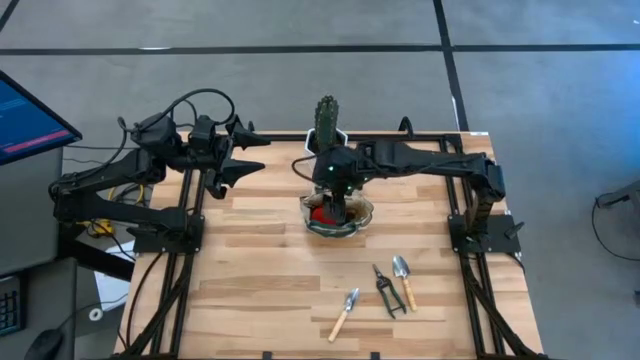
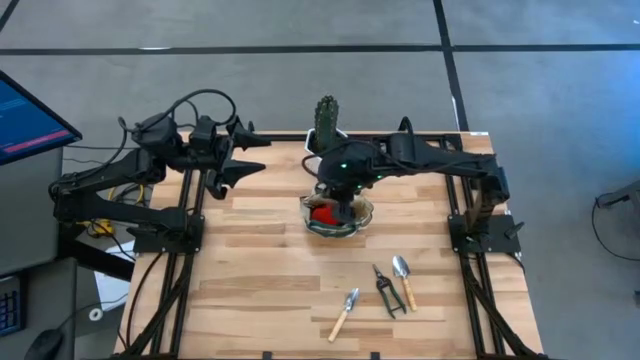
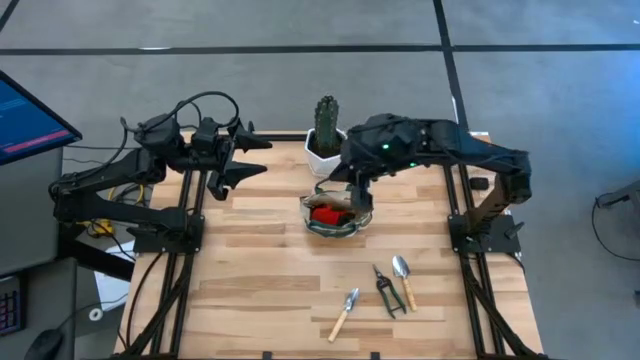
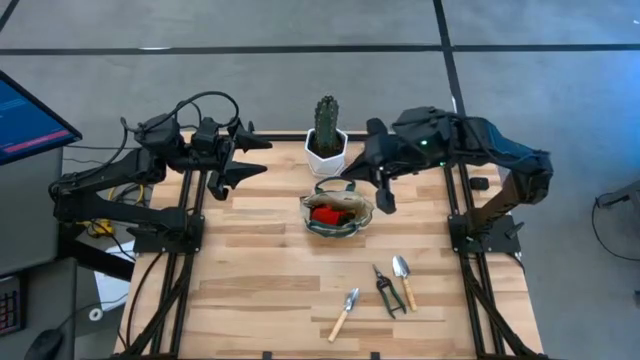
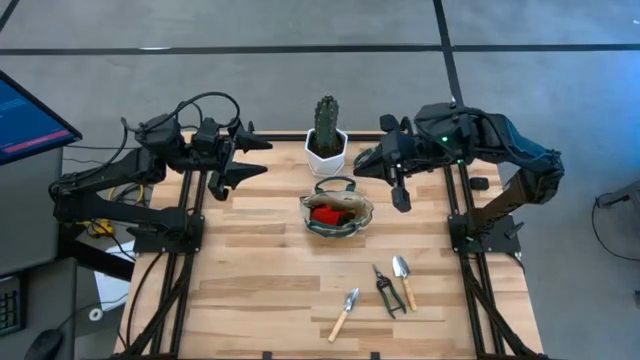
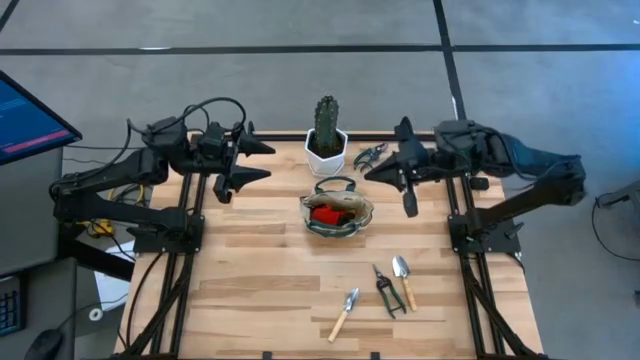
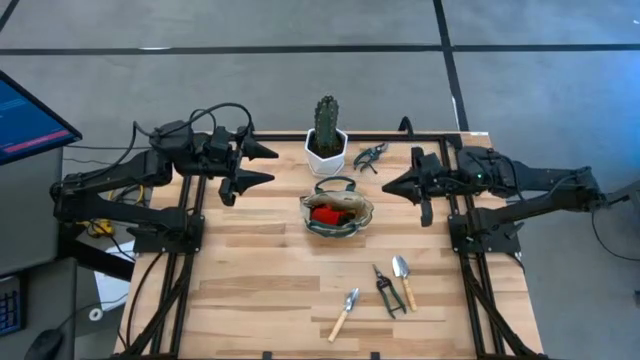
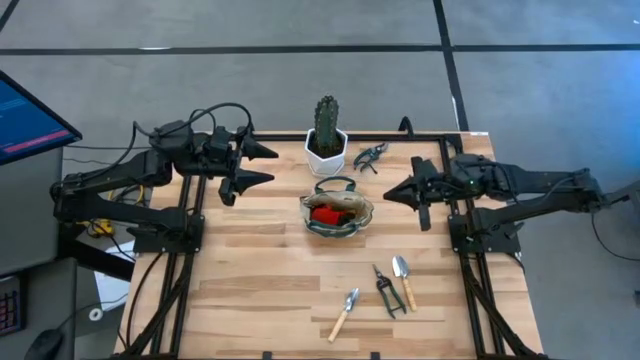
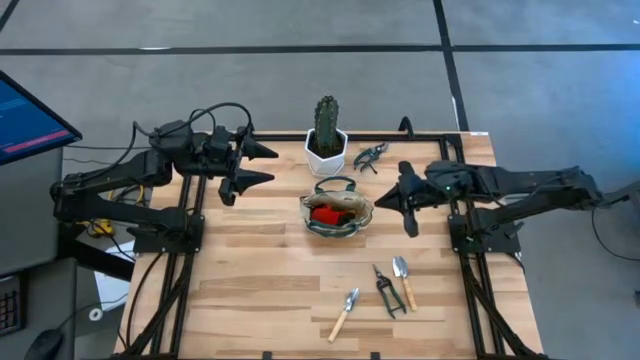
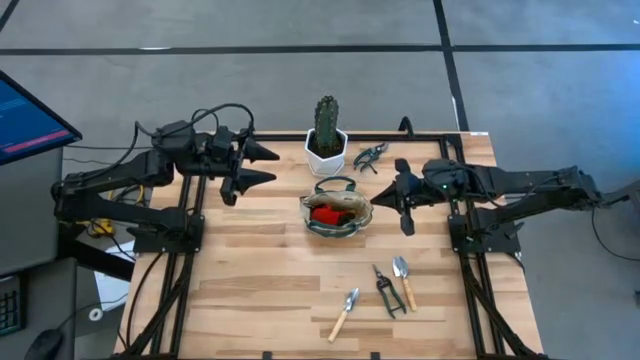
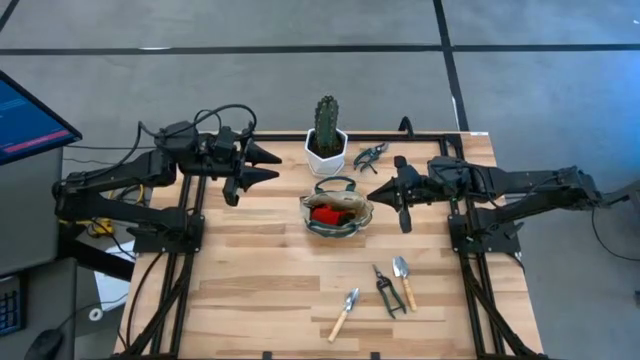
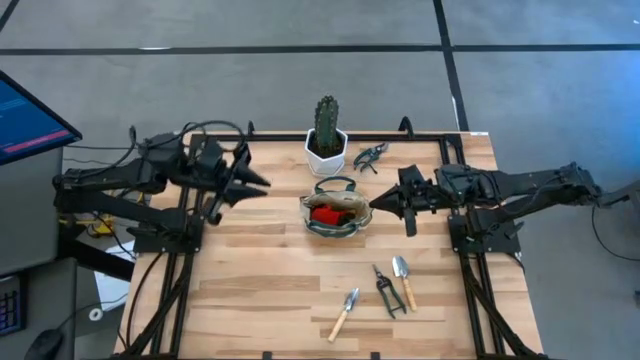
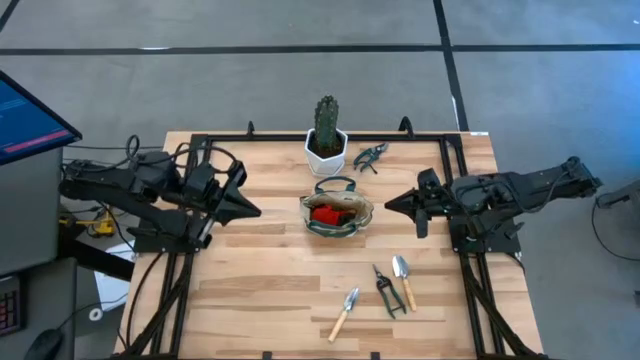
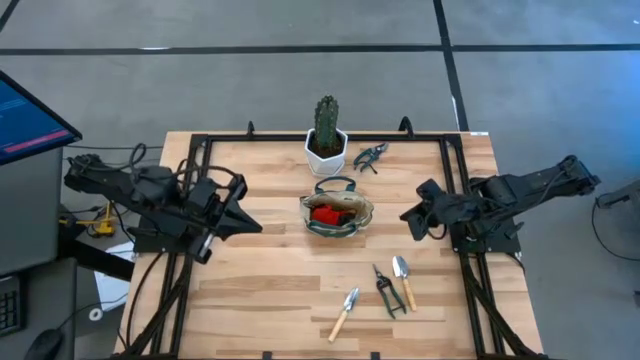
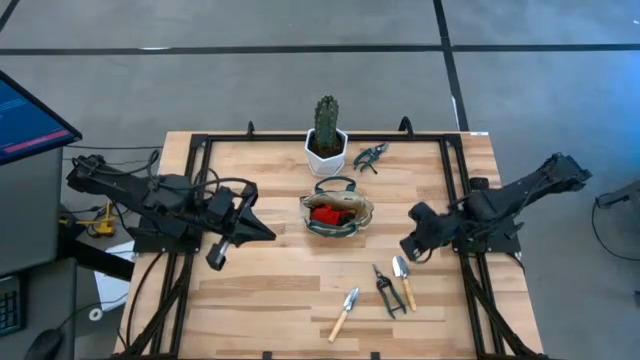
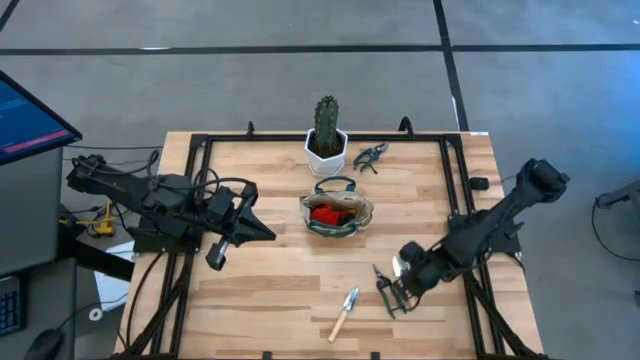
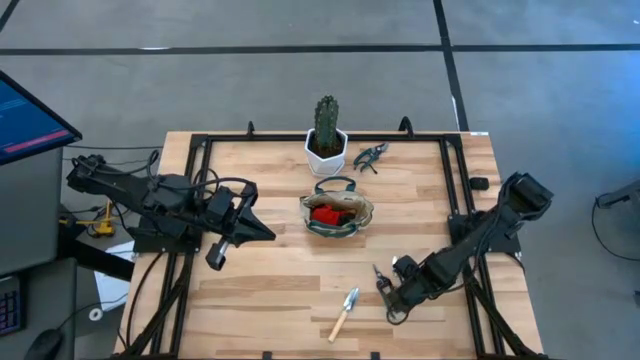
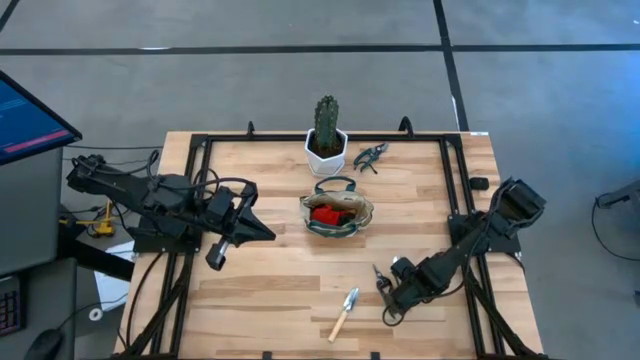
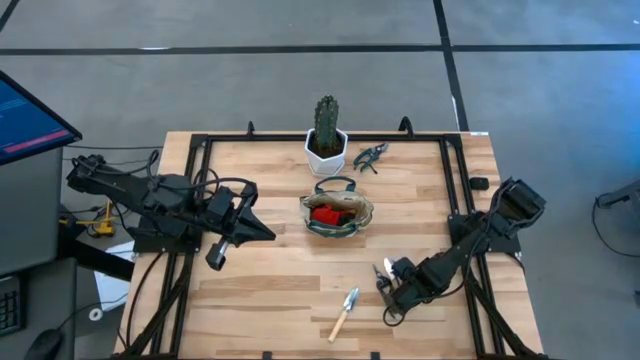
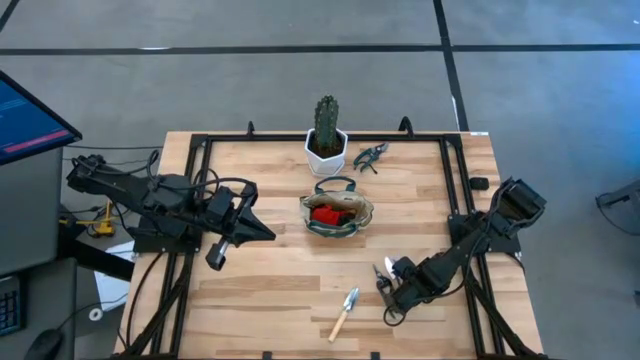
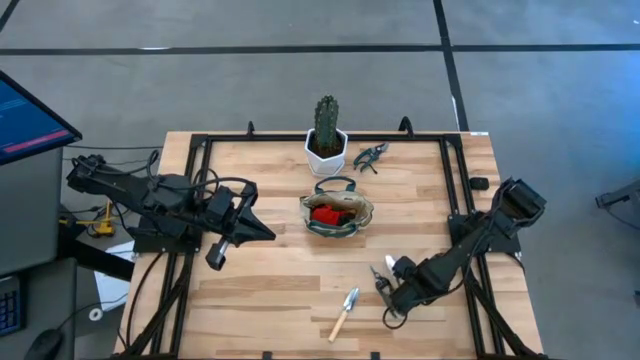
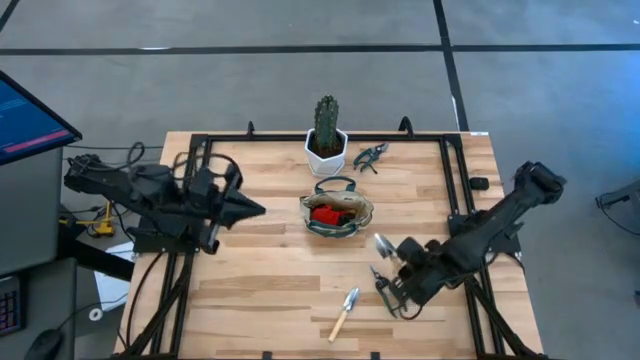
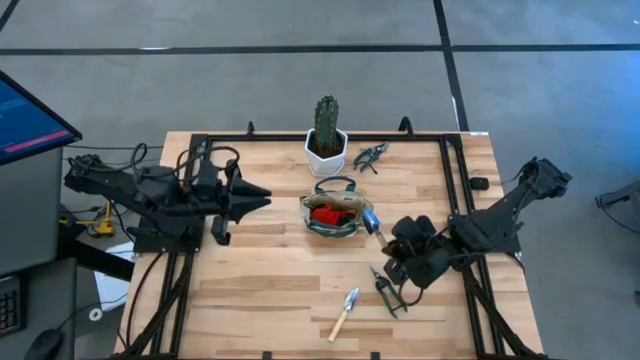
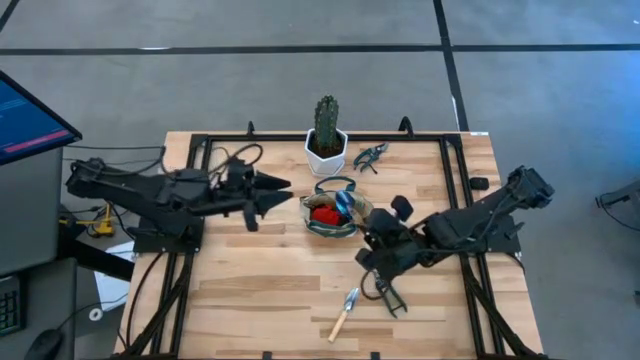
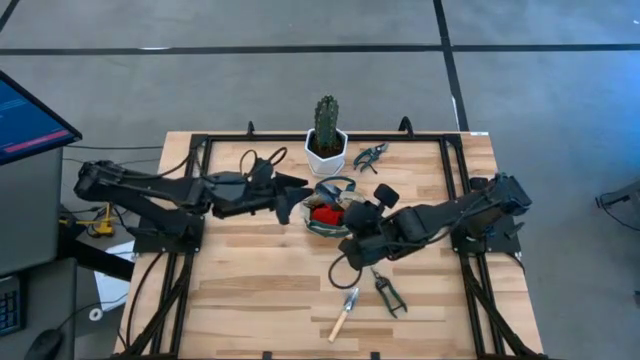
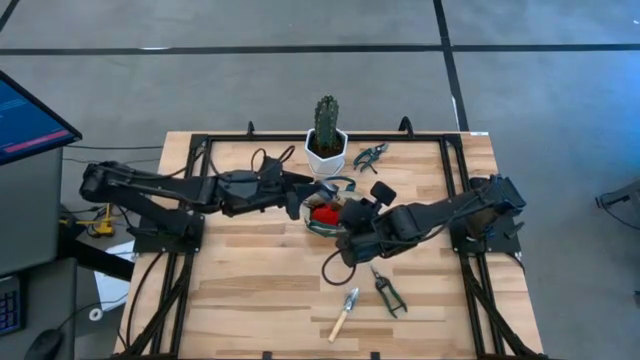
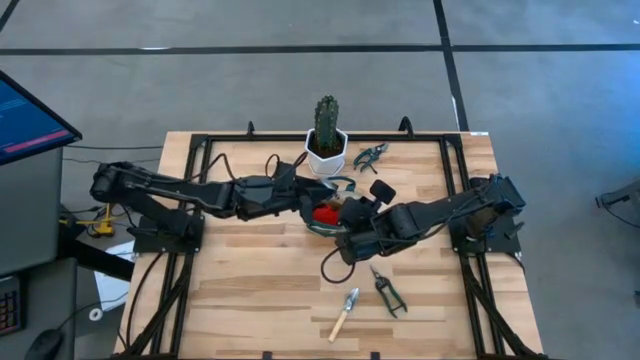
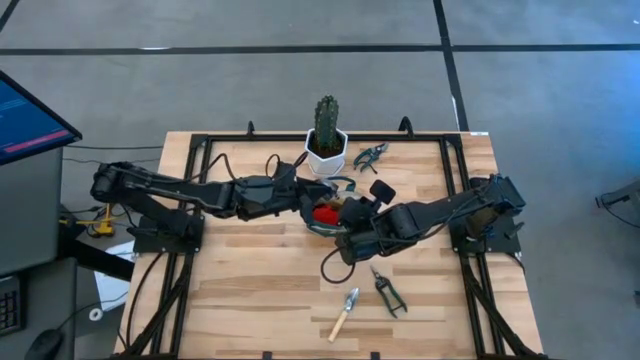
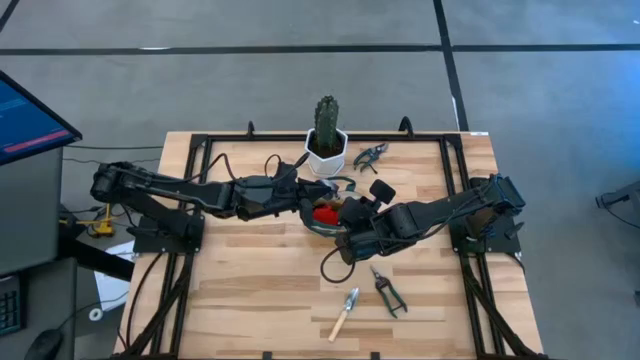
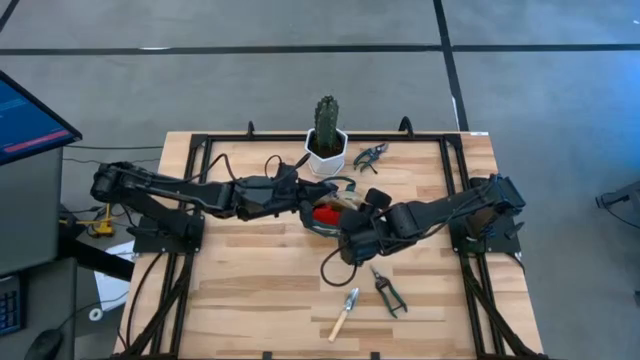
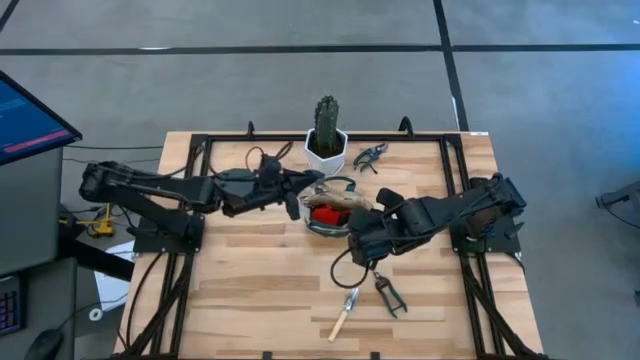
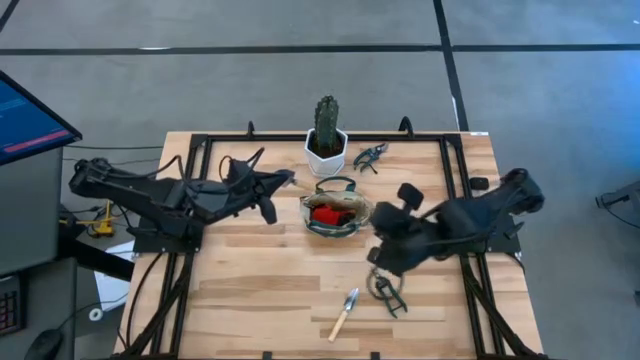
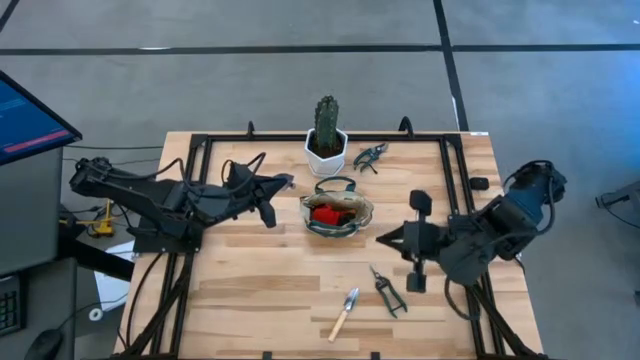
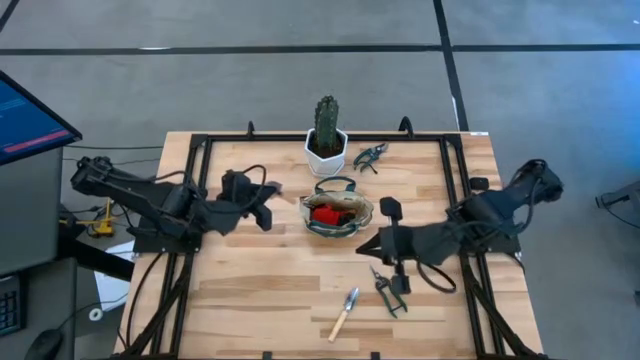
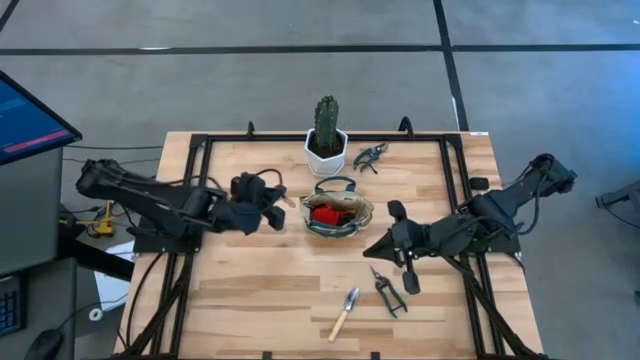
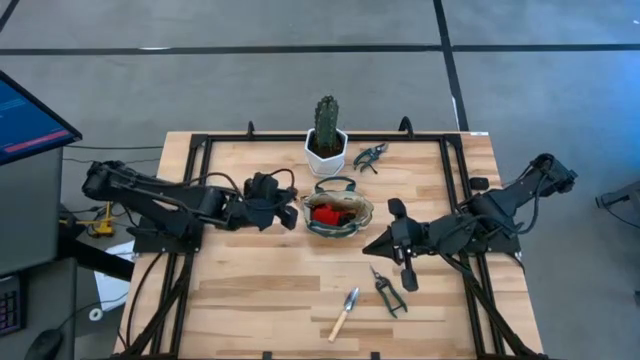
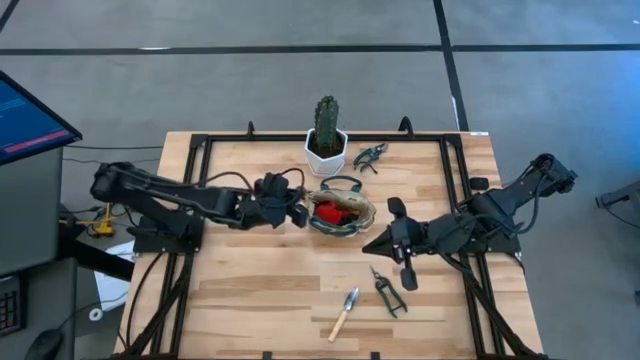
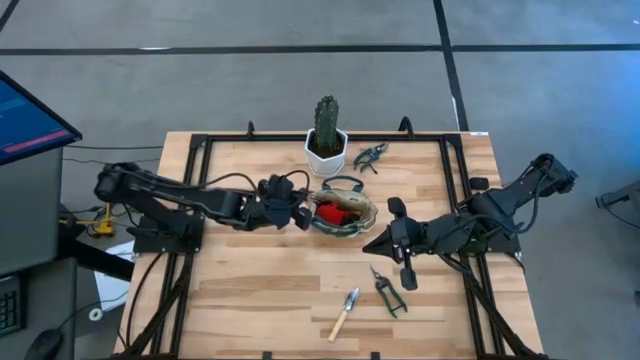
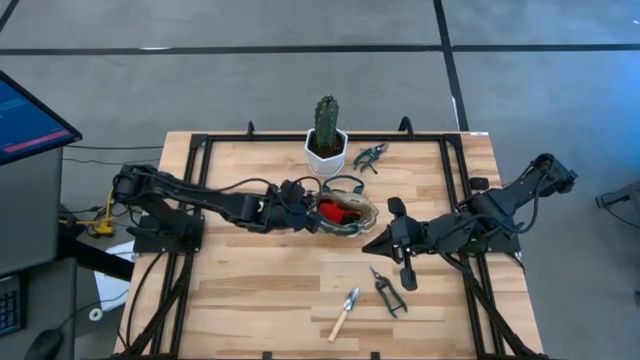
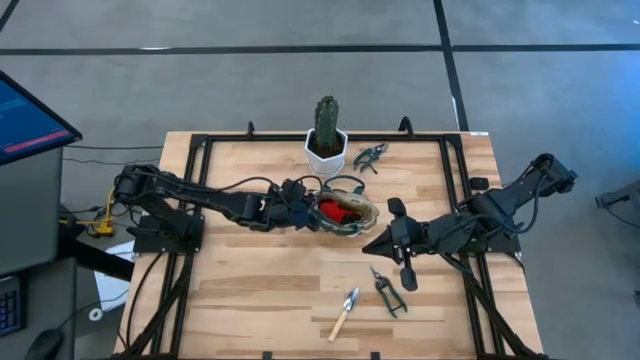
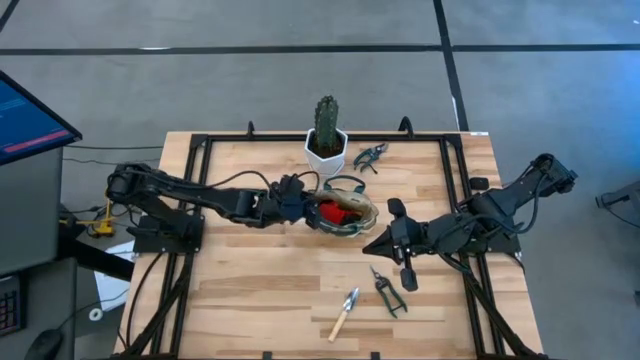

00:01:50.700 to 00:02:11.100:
Task: Pick & Place Garden tools in Gardening bag
Put the top brown trowel into the gardening bag

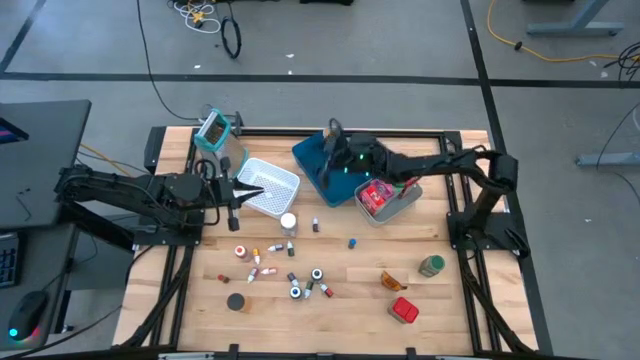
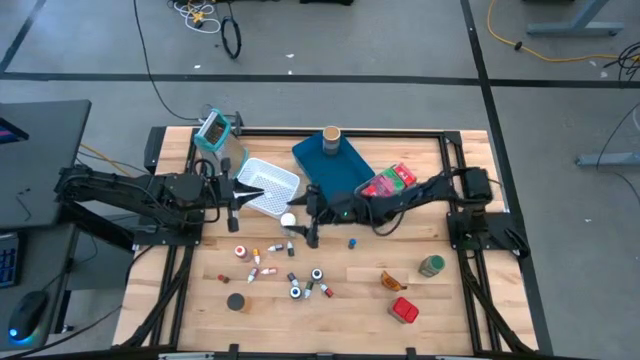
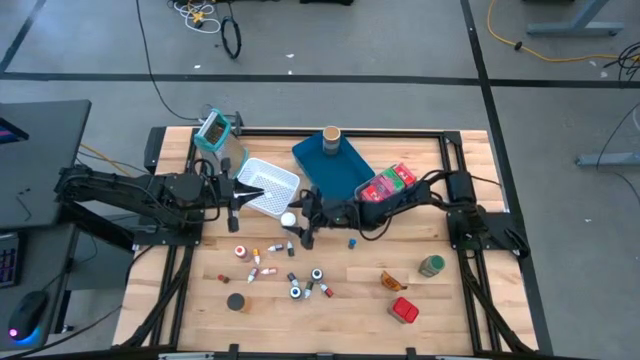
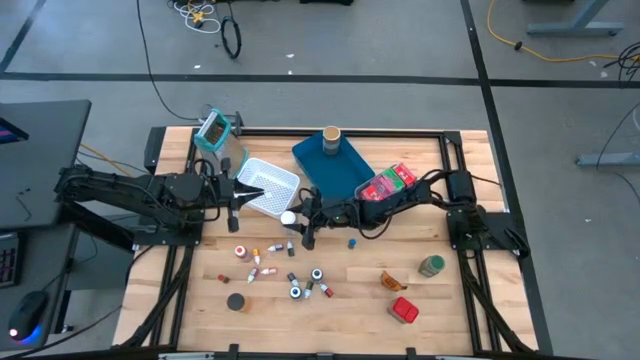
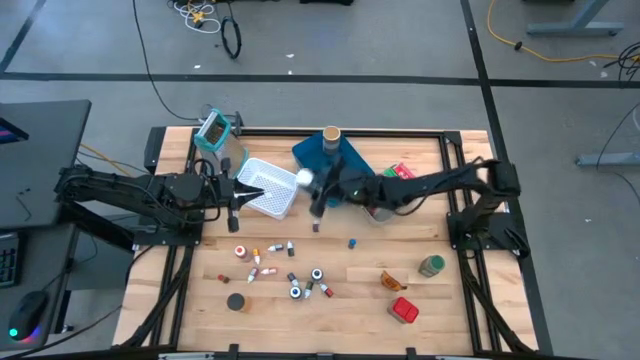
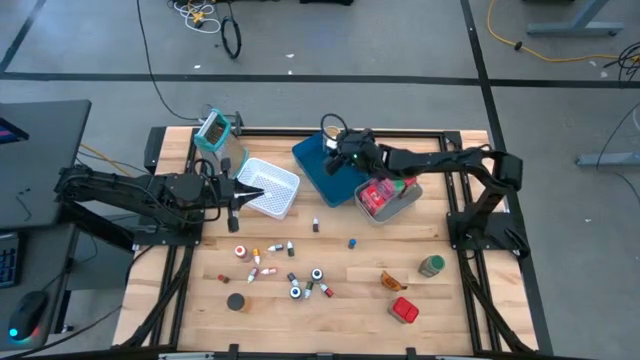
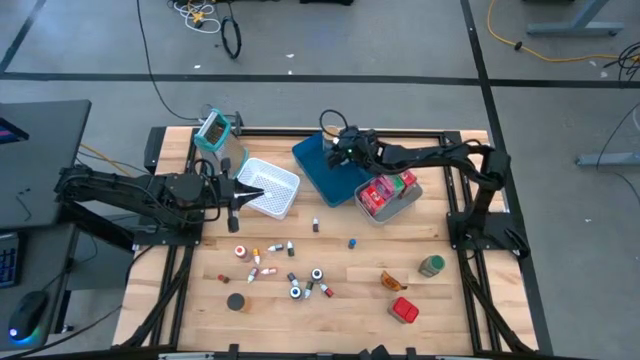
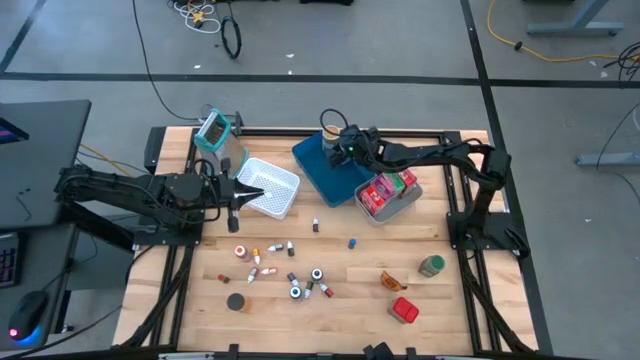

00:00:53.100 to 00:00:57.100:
Task: Pick & Place Kitchen Items
Put the white seasoning bottle into the blue bin
